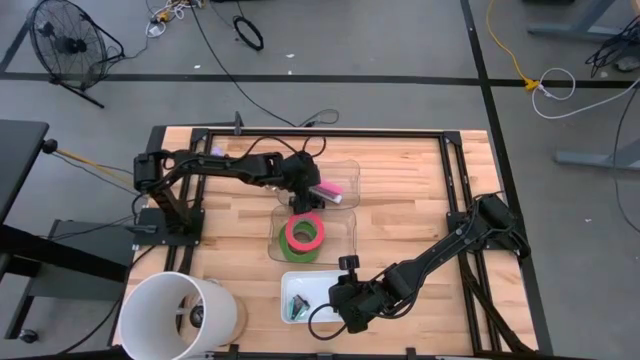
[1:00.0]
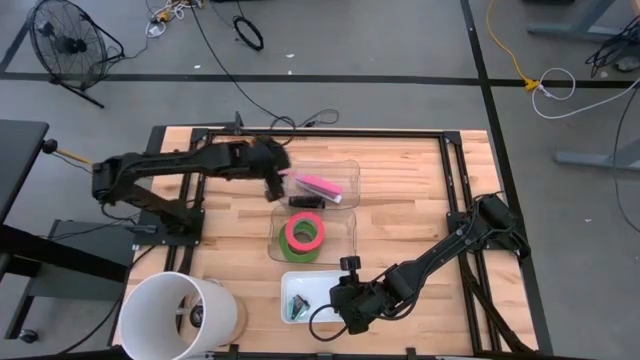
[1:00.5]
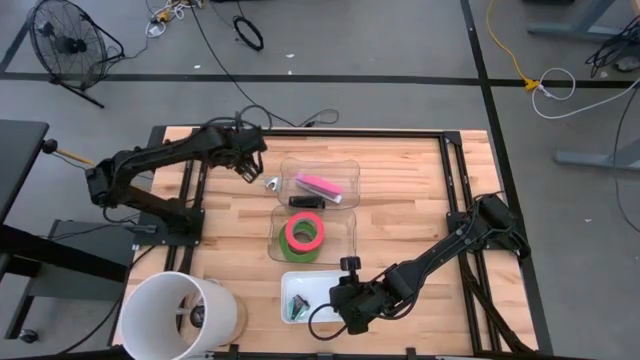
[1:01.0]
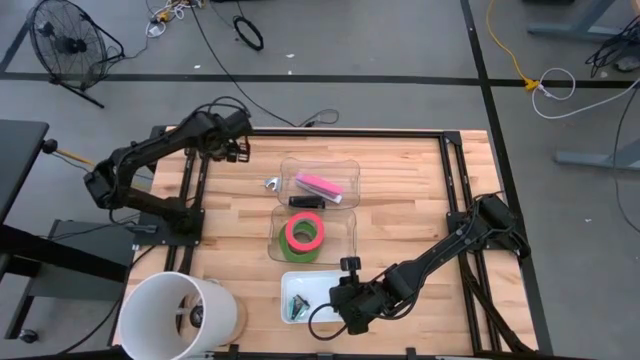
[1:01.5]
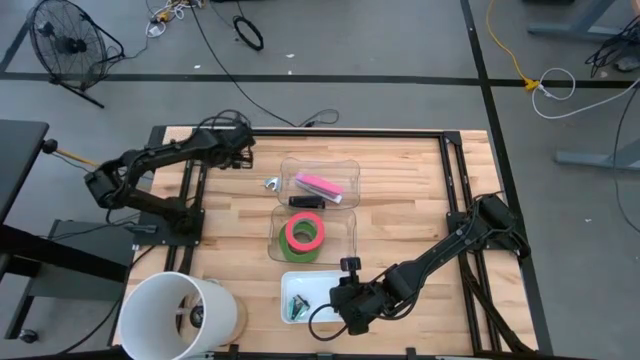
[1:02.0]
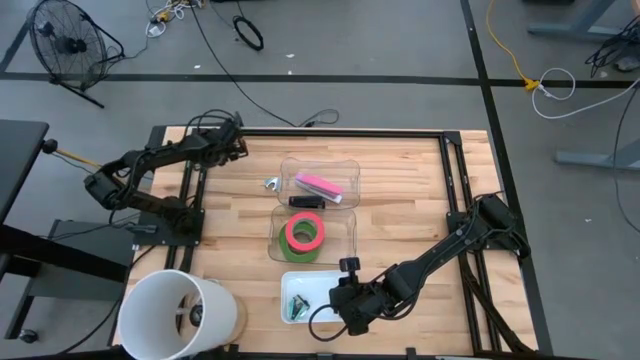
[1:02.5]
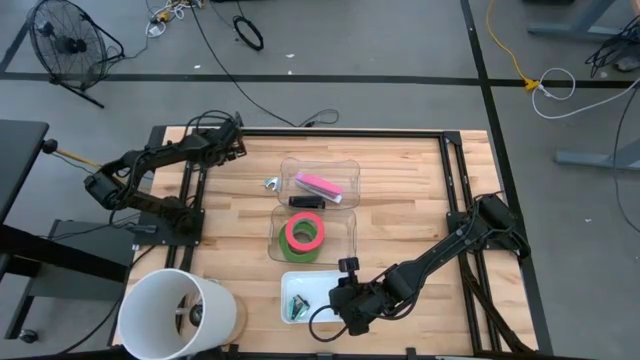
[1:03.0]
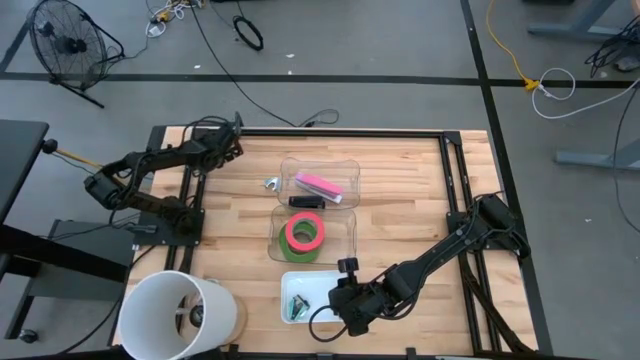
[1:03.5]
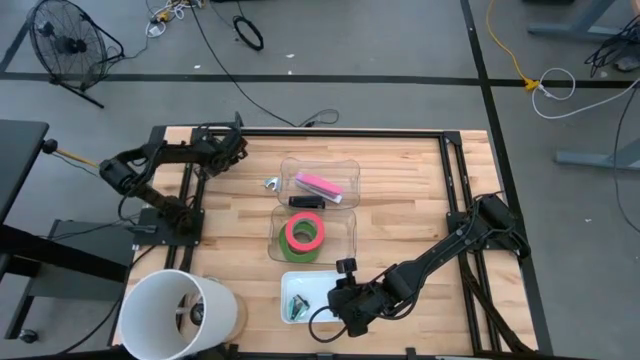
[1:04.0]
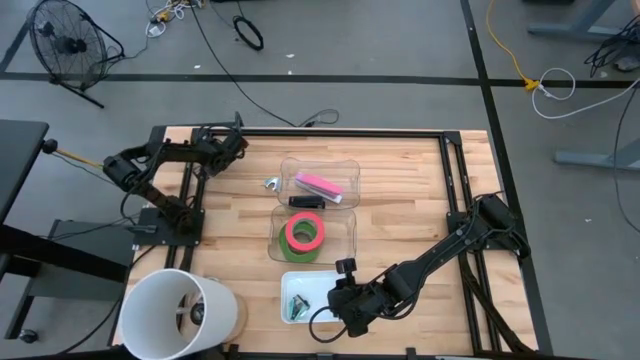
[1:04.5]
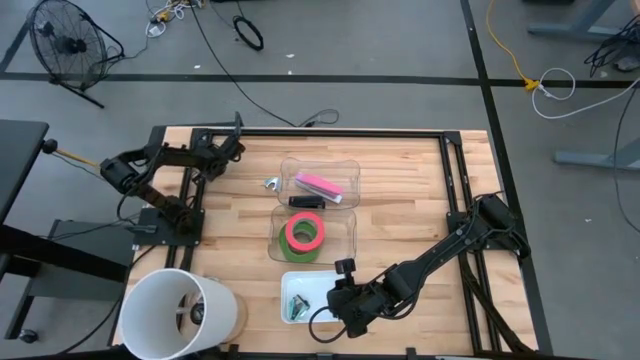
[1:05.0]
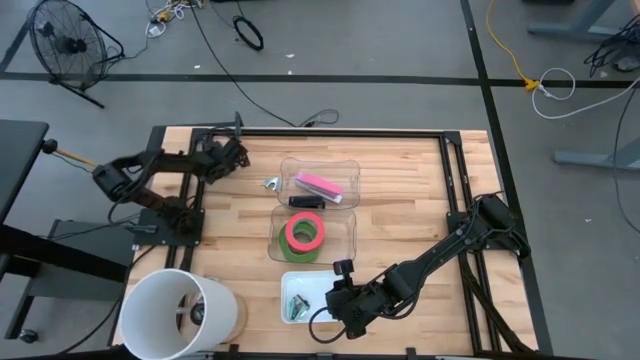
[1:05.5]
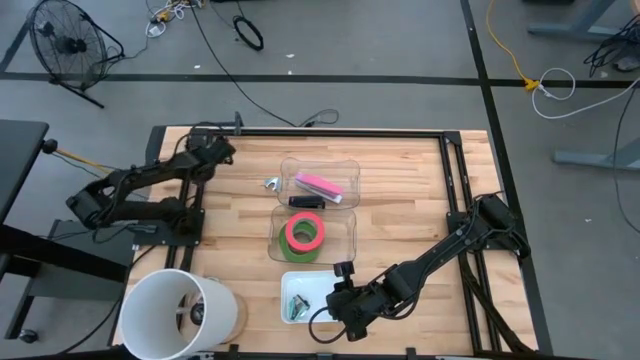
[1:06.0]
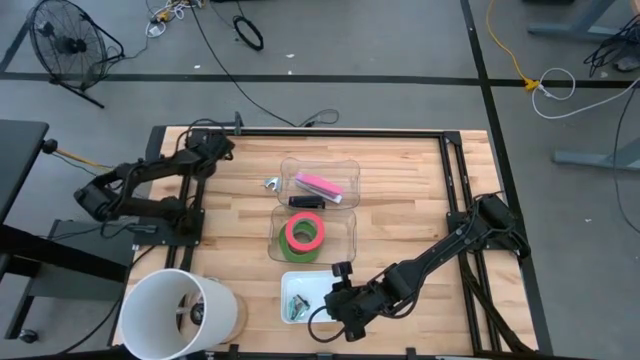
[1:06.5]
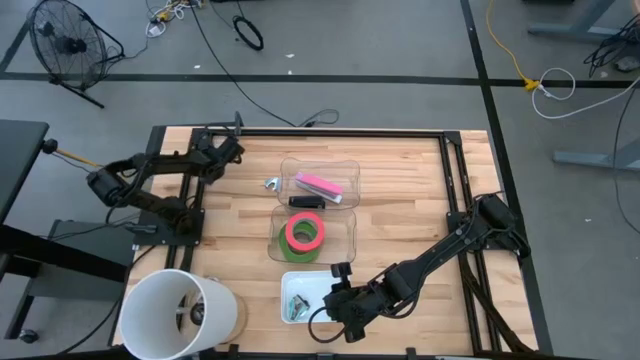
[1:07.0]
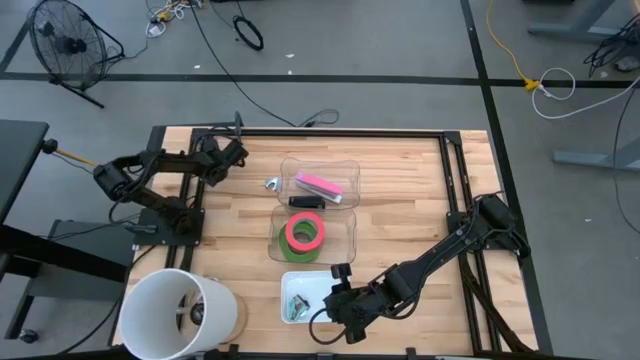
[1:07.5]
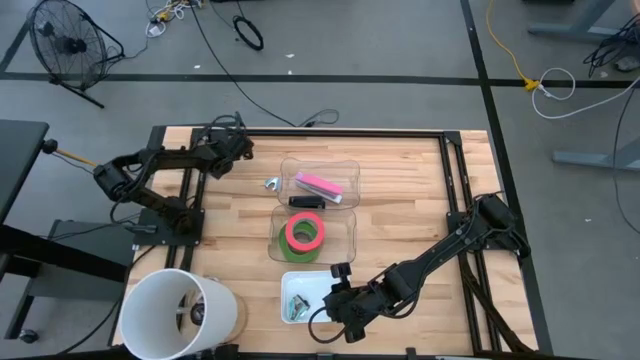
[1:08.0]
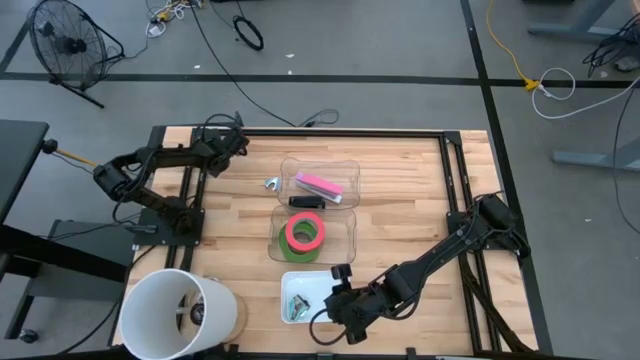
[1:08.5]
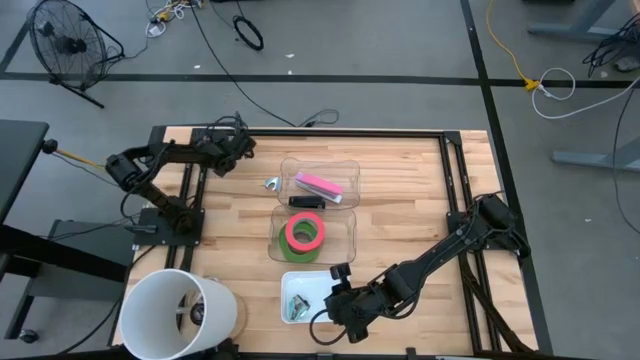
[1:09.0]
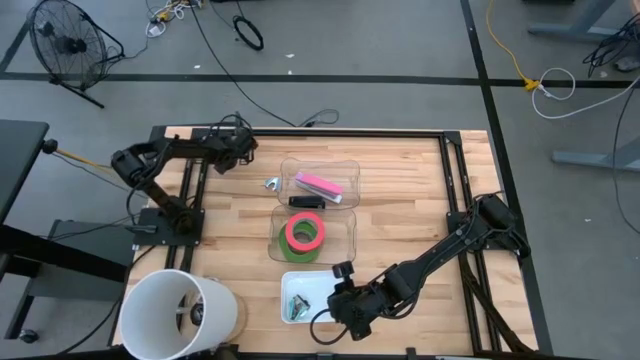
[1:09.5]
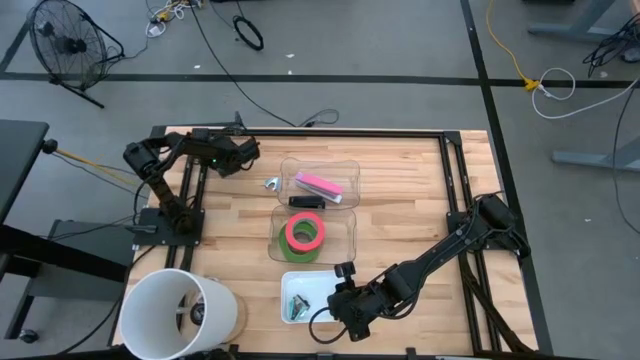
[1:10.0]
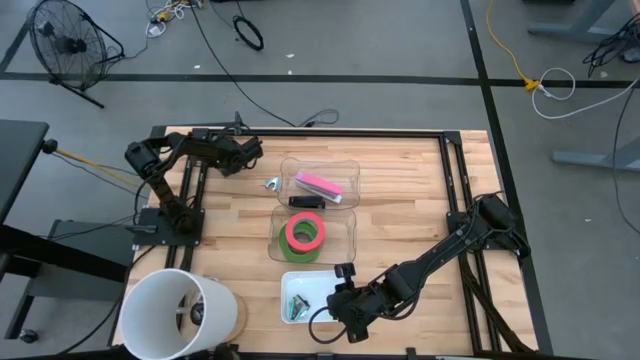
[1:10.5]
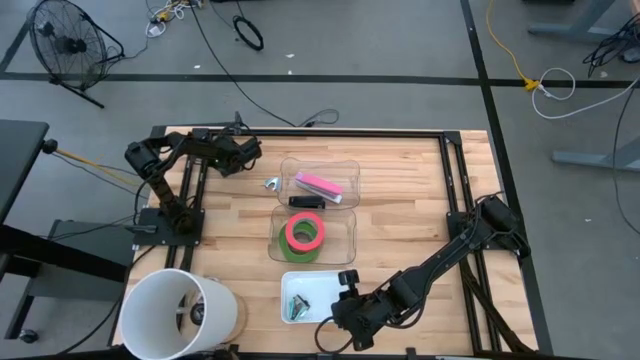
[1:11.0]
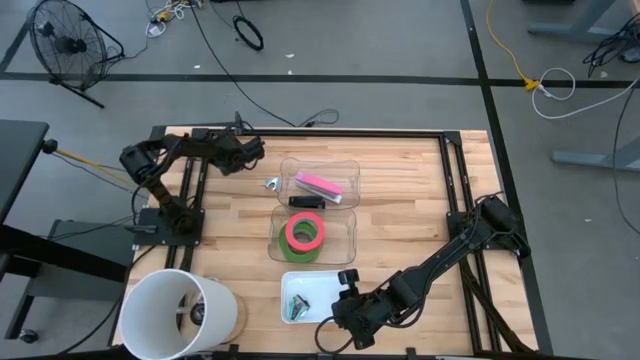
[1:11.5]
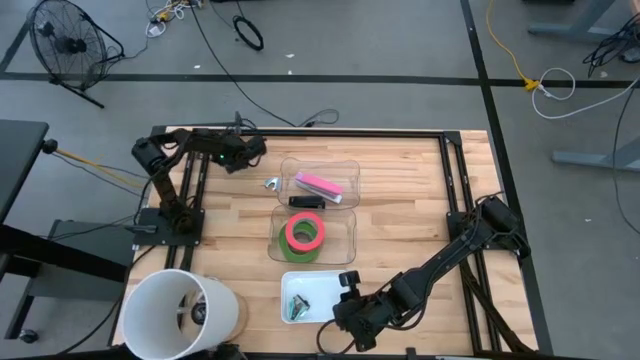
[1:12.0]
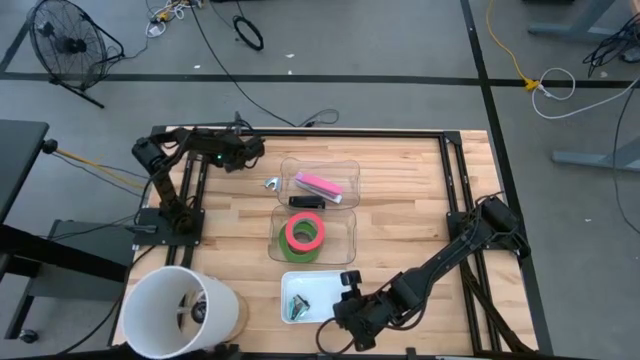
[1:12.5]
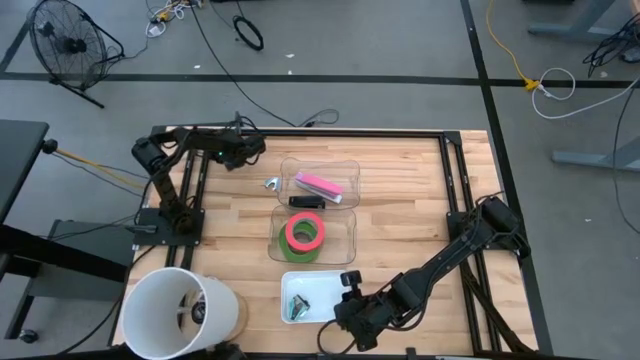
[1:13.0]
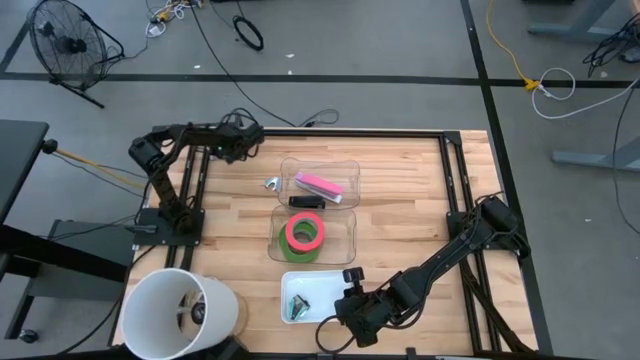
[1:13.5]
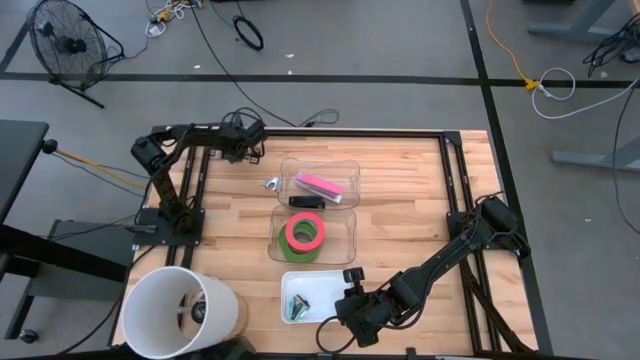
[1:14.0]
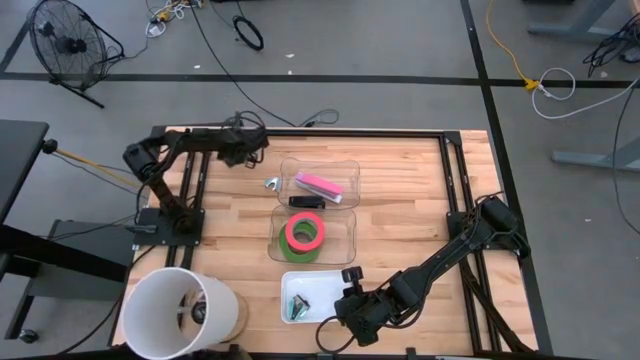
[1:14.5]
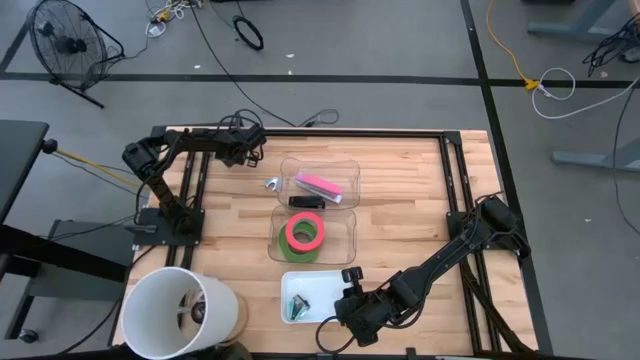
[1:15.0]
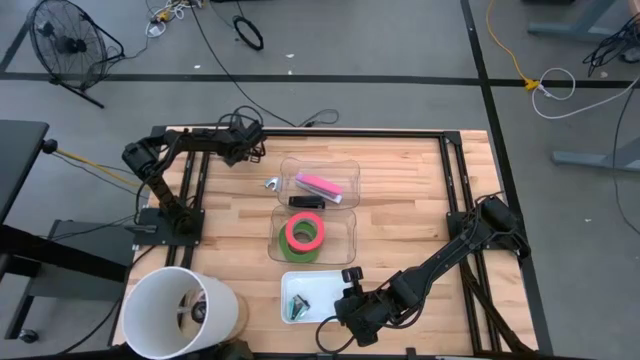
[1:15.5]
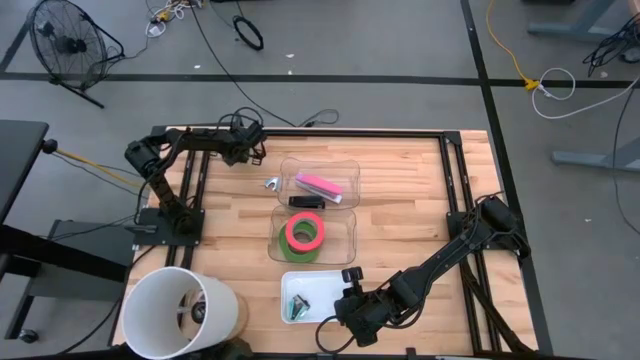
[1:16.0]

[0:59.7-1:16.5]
Task: Pick and place Stapler, Stapler remover, tape
Put the purple staple remover into the white bin

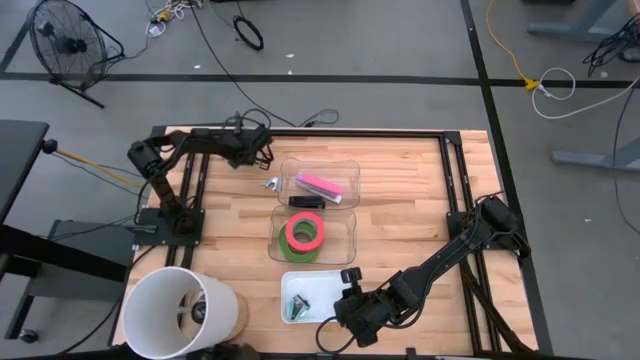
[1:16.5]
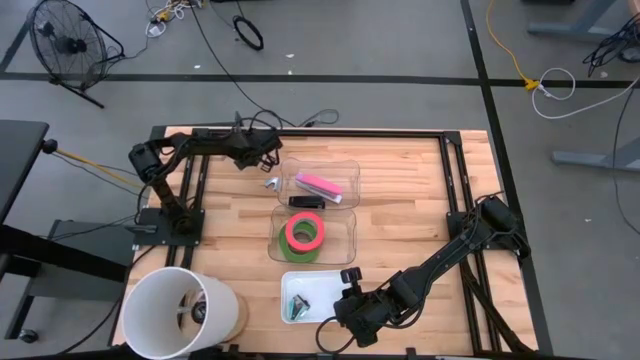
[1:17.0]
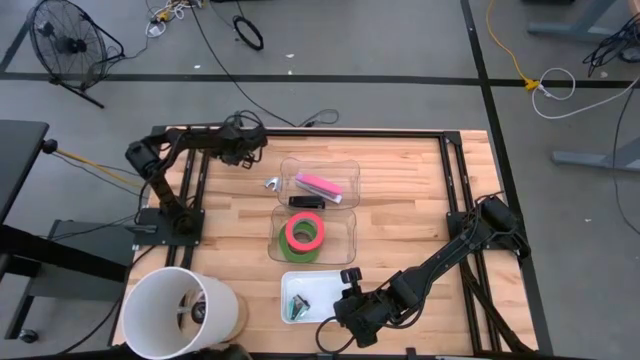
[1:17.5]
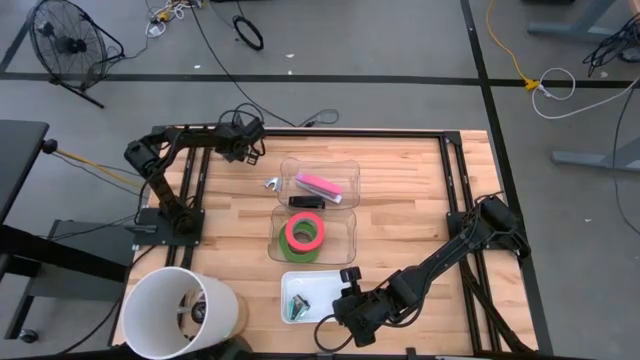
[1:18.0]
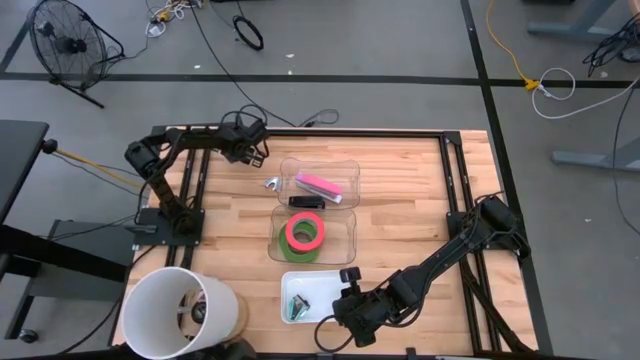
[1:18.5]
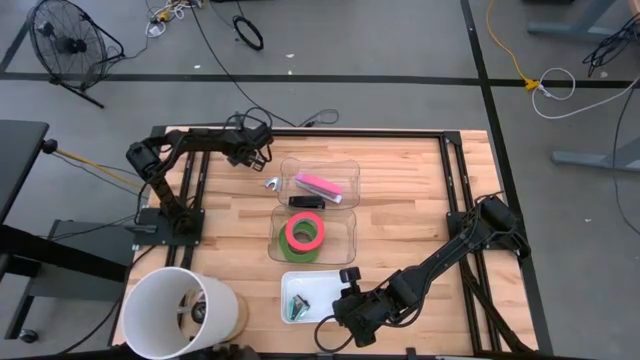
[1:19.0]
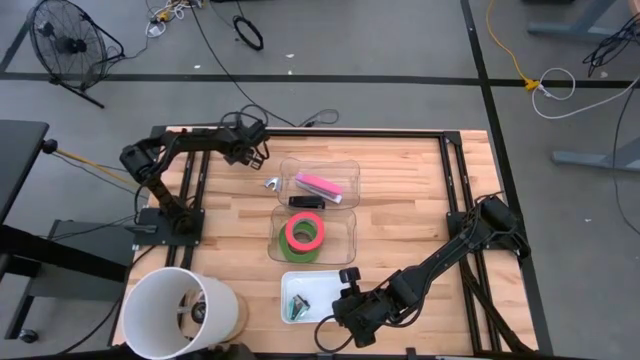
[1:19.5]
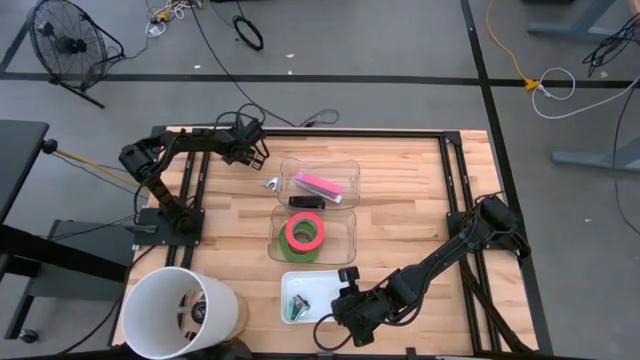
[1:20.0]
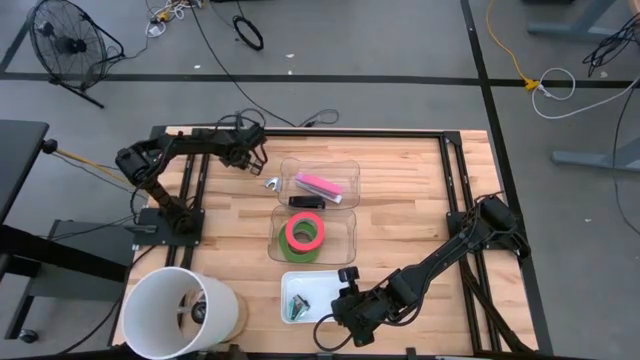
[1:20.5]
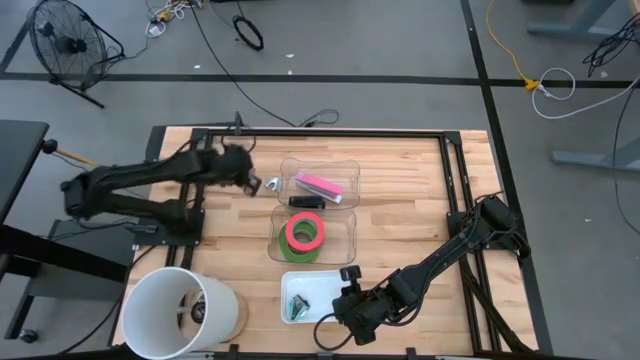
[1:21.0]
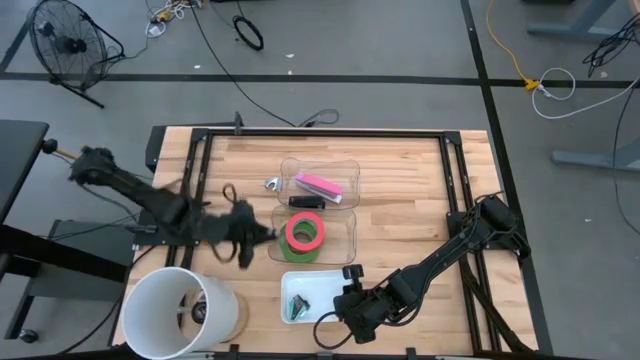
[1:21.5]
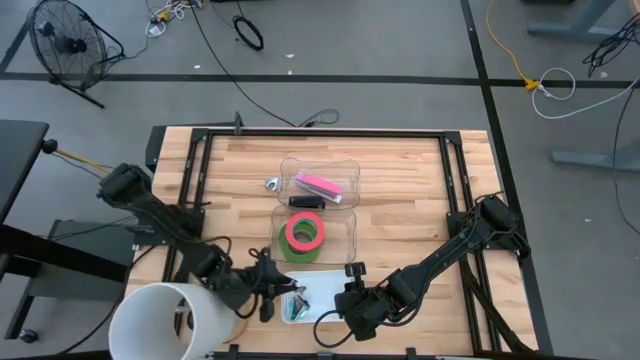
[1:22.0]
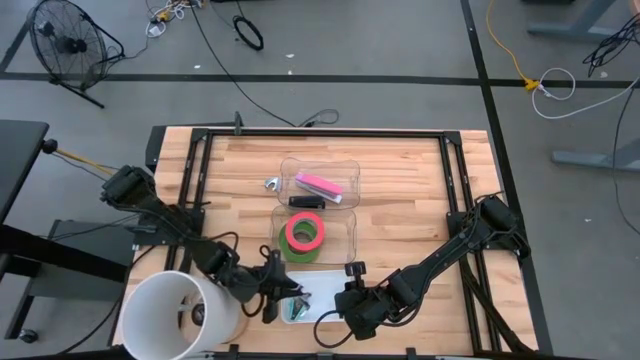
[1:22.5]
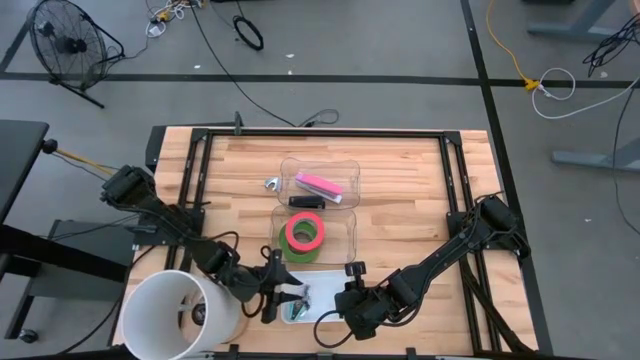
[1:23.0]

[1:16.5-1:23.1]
Put the purple staple remover into the white bin
